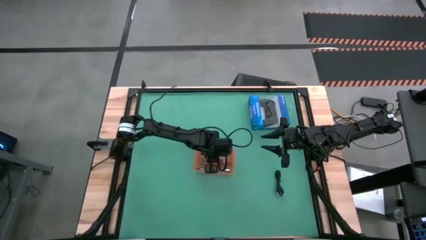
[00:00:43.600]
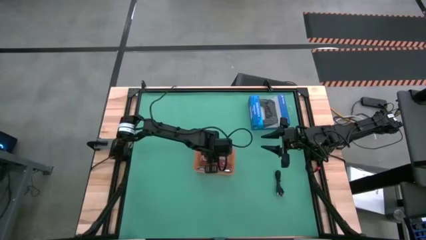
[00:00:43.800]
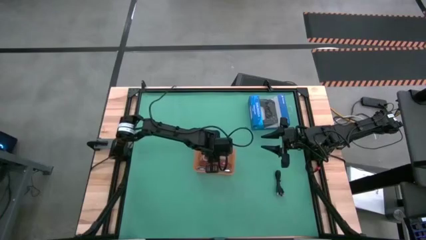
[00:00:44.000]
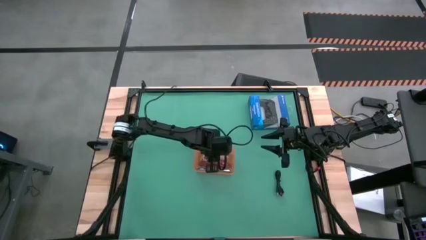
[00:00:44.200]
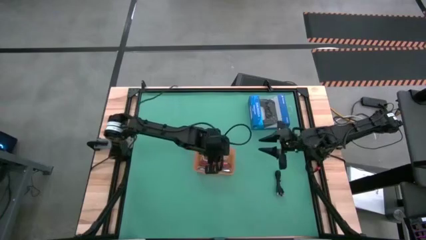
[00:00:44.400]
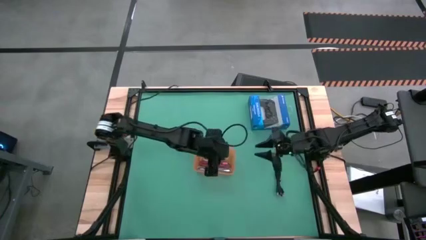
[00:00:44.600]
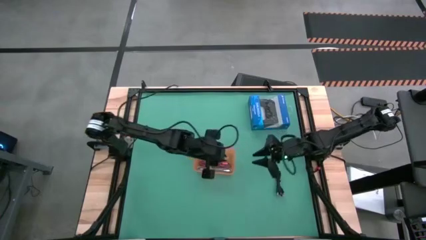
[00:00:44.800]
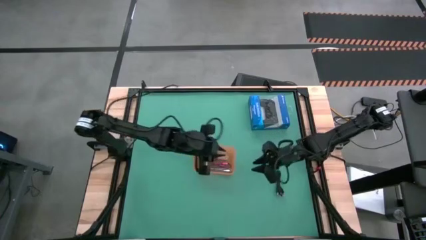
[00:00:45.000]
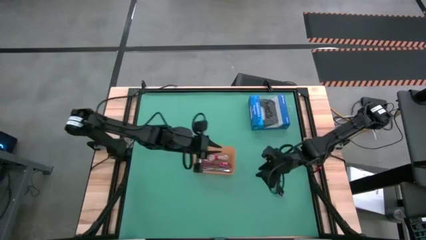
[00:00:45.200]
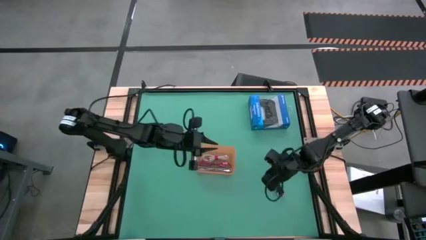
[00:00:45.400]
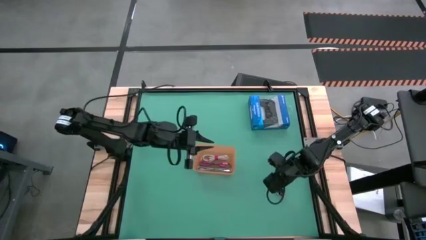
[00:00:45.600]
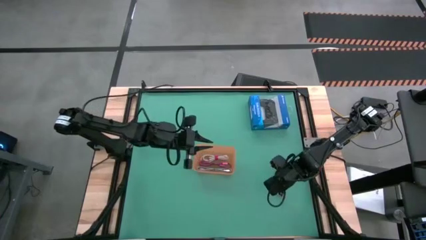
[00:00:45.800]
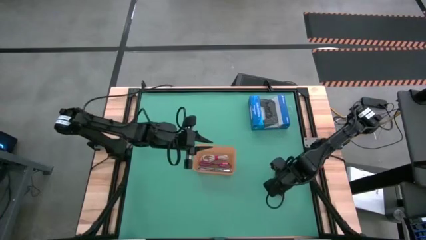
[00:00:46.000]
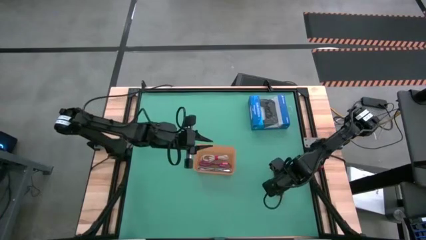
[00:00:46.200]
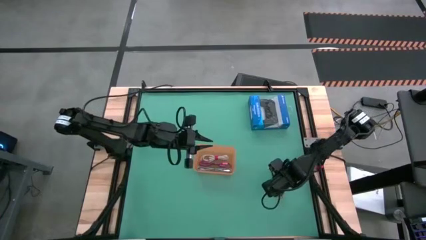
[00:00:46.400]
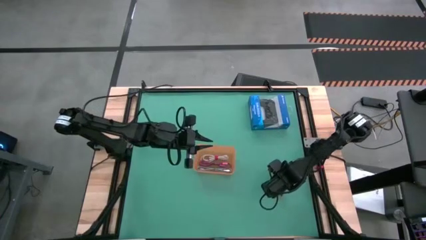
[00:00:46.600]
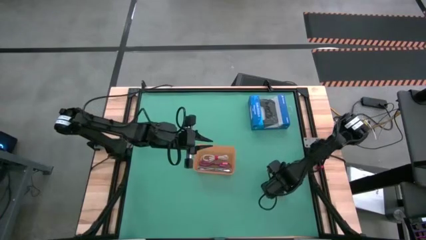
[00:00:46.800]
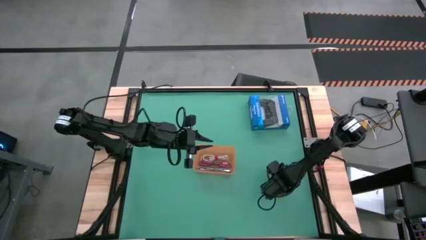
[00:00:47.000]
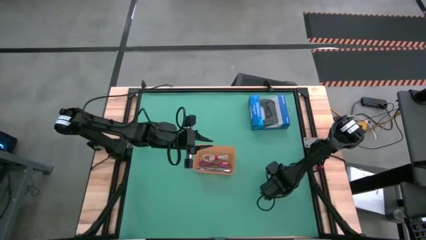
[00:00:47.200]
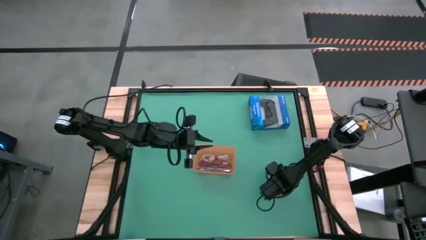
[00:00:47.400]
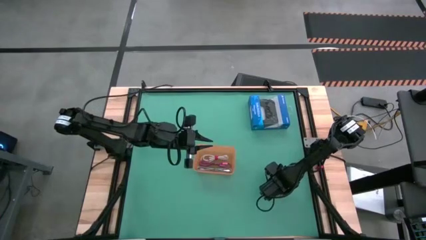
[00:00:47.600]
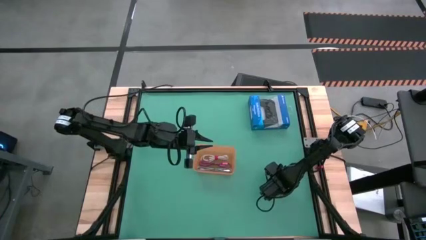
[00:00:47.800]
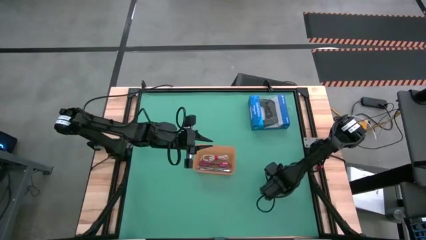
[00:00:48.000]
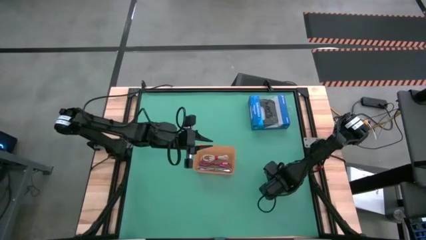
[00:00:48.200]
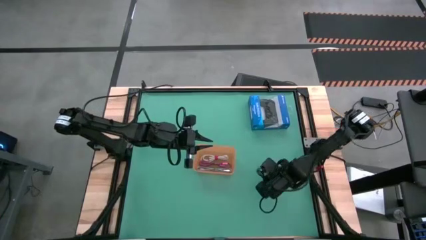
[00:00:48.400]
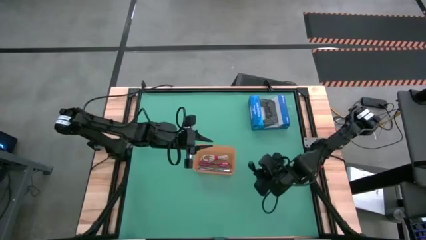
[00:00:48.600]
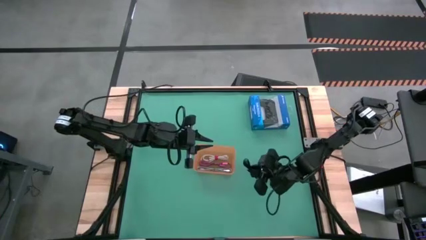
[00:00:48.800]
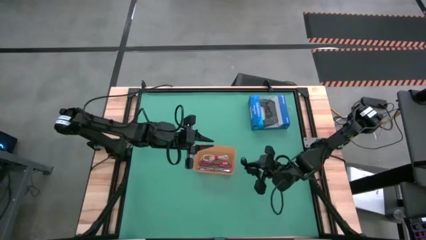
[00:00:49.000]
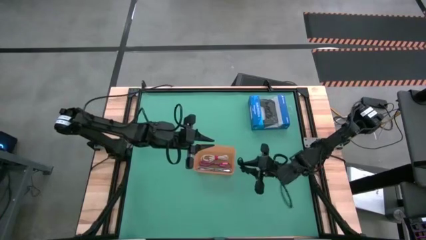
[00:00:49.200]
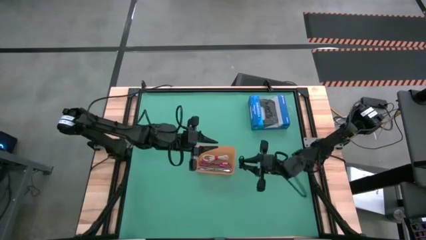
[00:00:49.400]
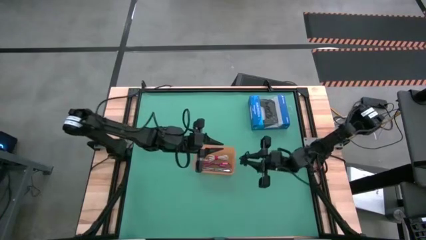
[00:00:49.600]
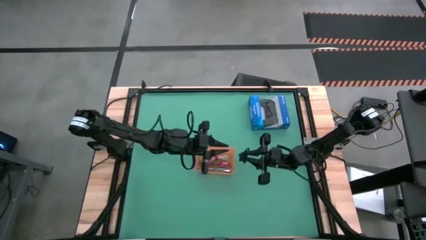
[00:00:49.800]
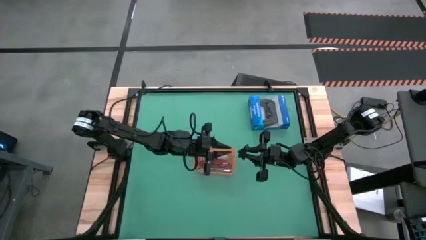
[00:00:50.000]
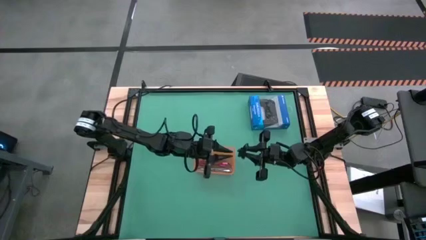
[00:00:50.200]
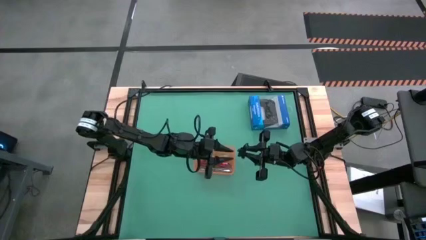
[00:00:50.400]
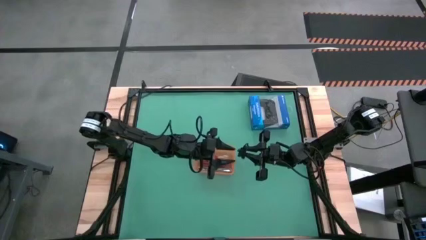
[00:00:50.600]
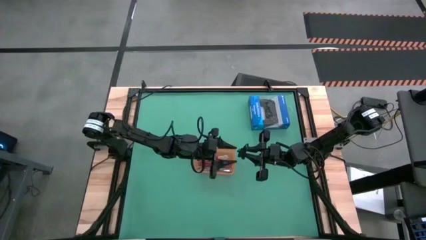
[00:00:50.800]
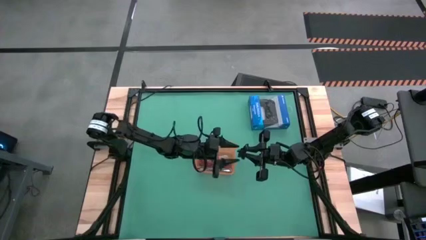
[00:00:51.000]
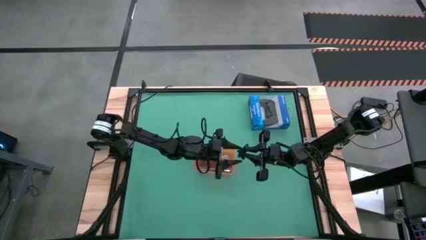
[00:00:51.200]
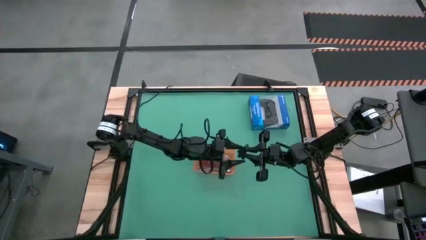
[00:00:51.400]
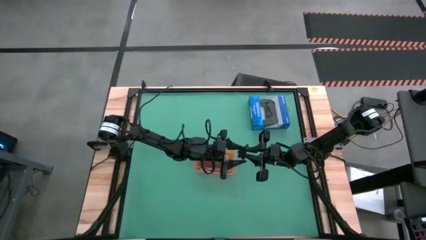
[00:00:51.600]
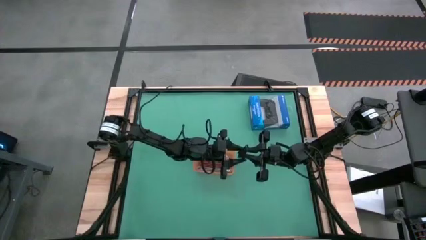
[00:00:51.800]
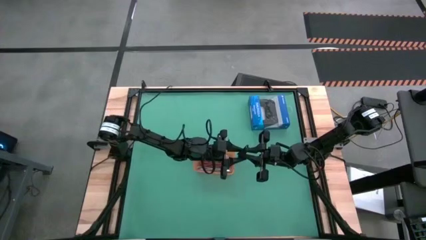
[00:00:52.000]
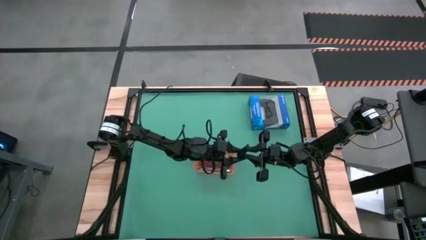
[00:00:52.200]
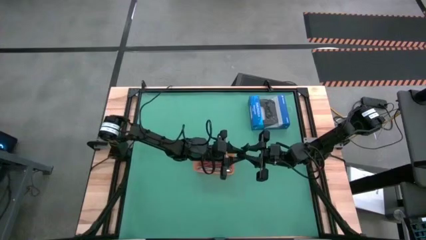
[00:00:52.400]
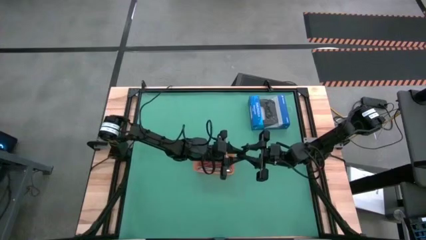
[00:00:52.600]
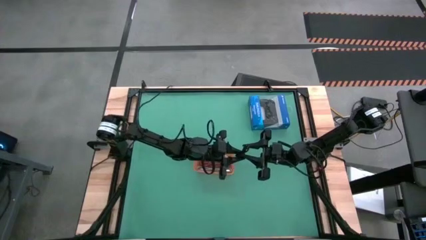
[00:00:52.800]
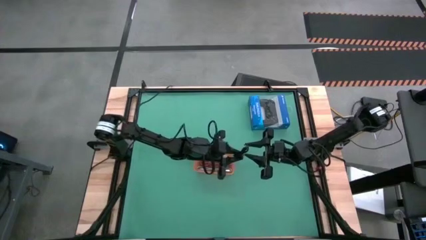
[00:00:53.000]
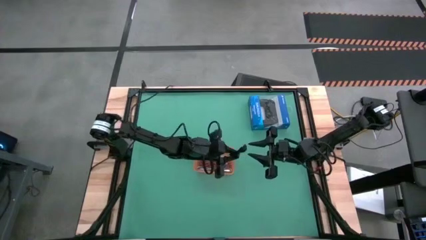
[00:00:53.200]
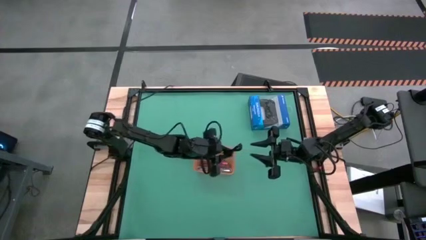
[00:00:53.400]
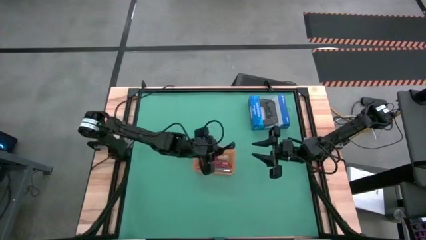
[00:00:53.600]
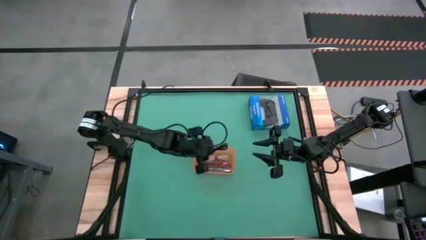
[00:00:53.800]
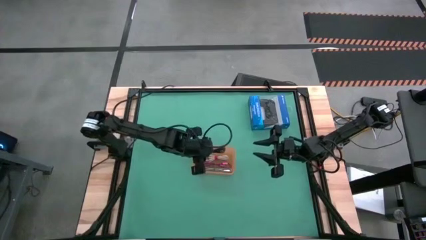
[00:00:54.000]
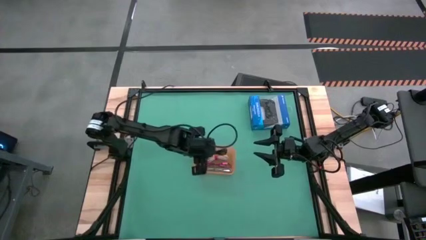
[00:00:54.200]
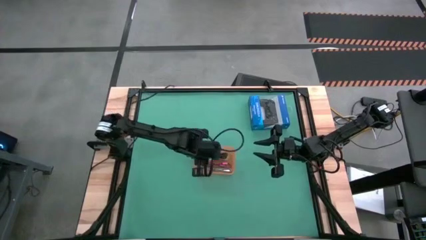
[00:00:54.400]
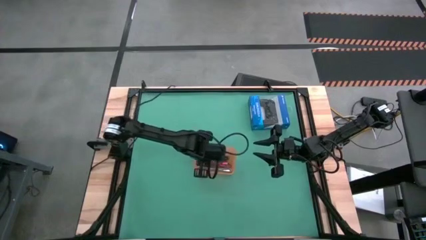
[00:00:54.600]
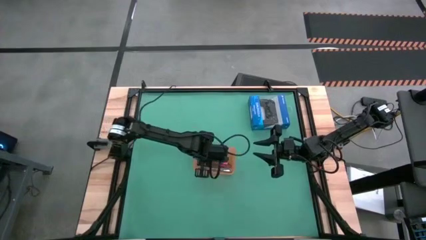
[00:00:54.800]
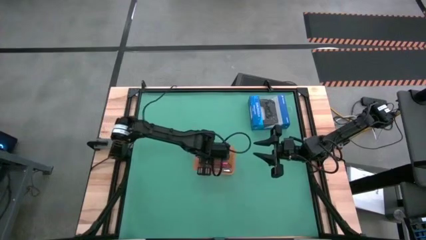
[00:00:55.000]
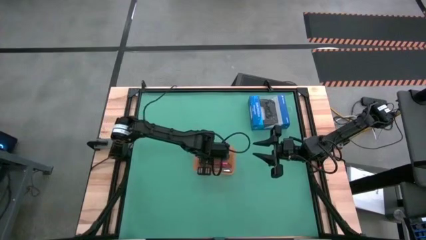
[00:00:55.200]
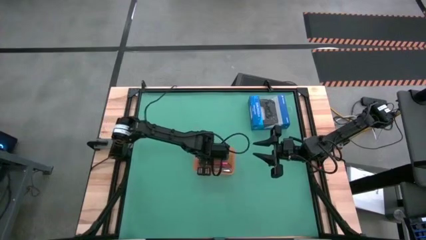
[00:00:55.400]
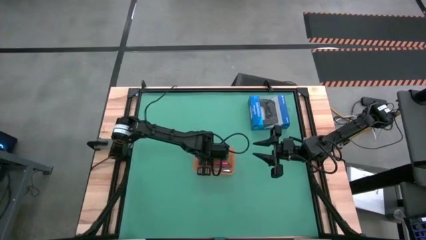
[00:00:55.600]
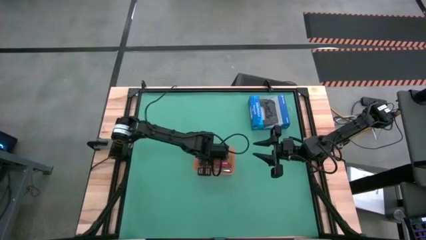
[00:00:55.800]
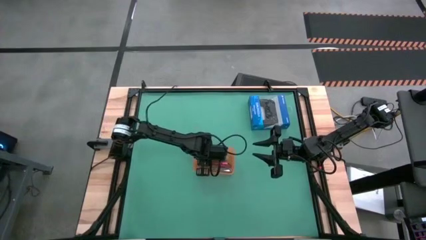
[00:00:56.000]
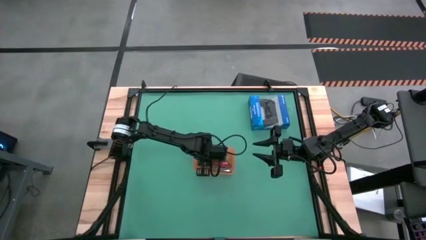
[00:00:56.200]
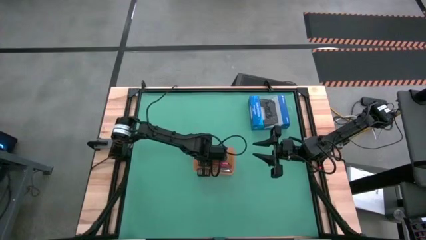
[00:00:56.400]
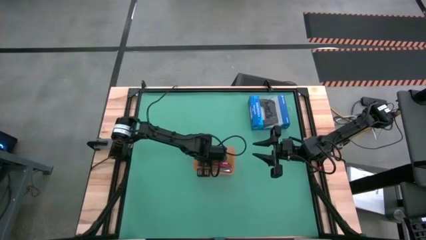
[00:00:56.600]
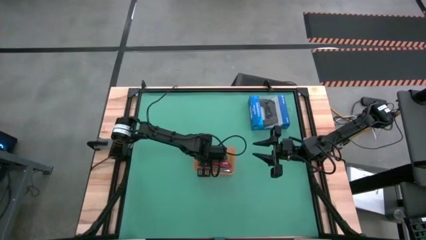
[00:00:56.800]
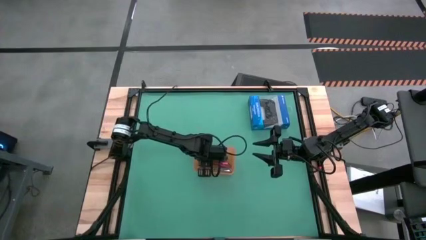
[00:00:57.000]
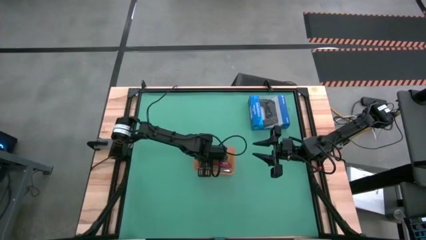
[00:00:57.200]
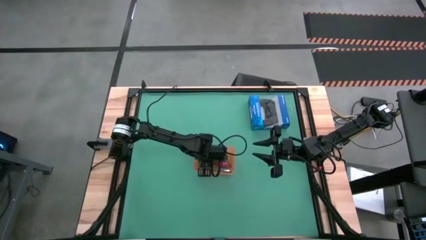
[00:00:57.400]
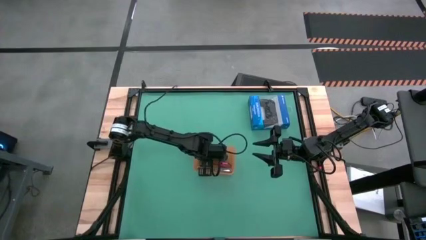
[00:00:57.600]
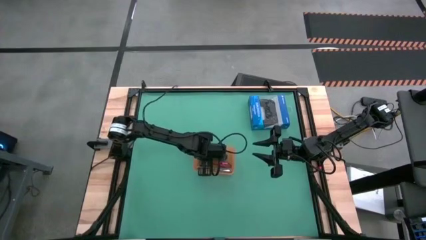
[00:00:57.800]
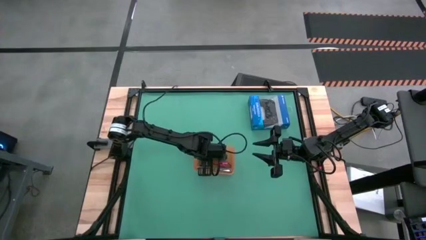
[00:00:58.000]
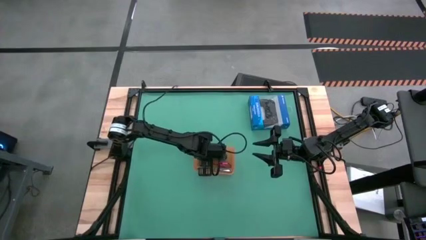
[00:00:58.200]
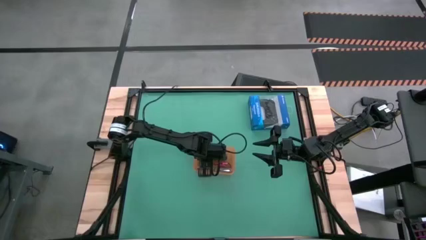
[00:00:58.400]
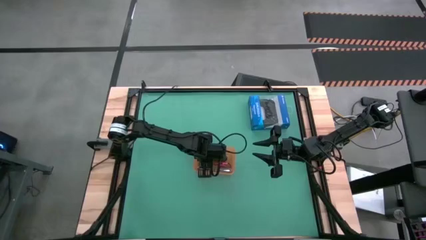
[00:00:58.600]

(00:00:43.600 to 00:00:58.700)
Task: Pick and place USB-C Cables
Put the black charger cable into the orange bin
